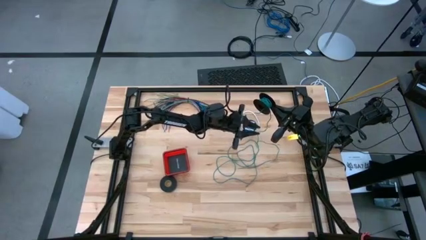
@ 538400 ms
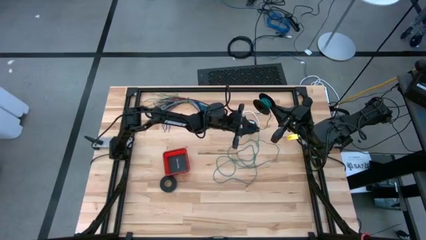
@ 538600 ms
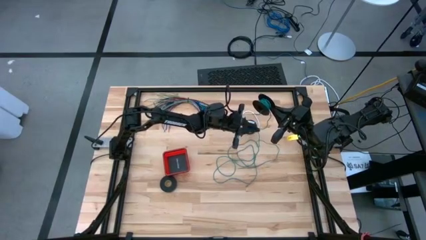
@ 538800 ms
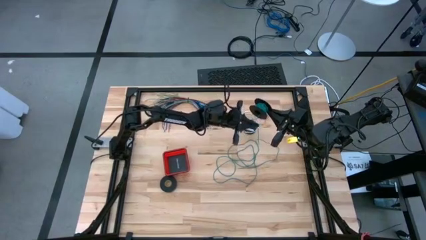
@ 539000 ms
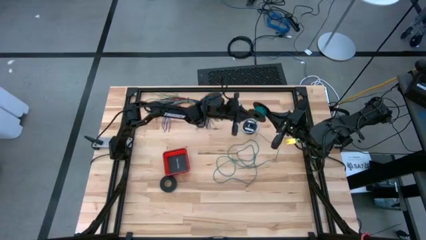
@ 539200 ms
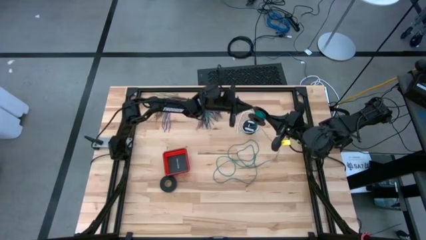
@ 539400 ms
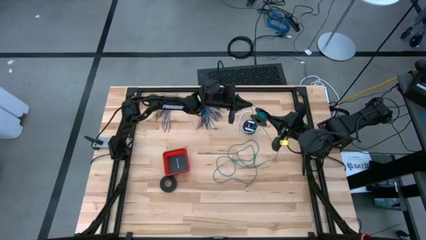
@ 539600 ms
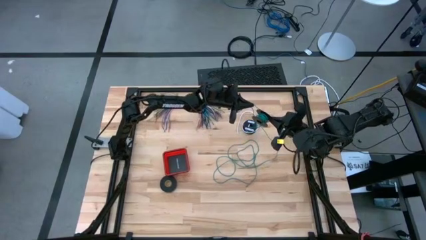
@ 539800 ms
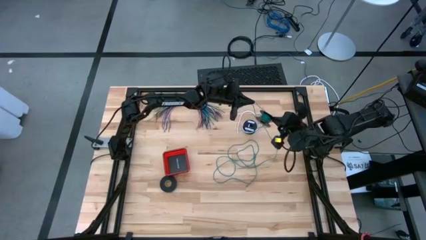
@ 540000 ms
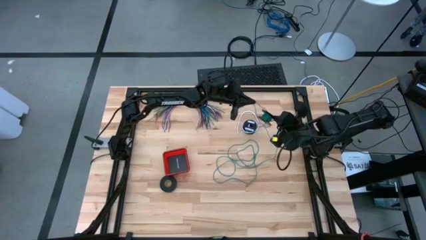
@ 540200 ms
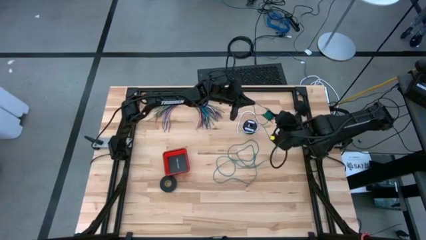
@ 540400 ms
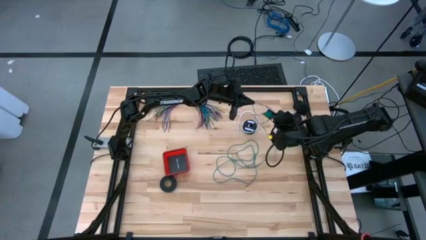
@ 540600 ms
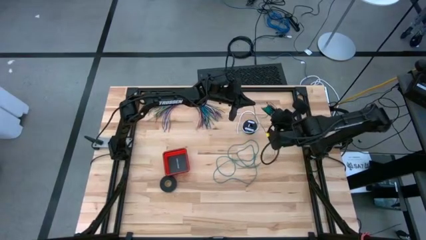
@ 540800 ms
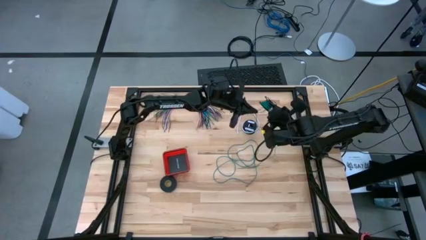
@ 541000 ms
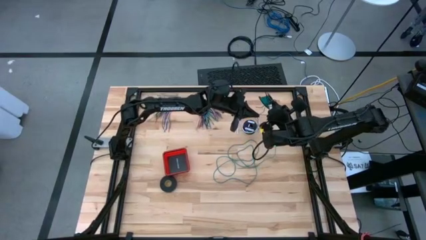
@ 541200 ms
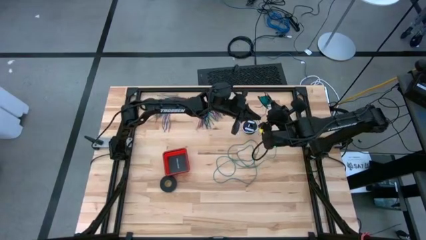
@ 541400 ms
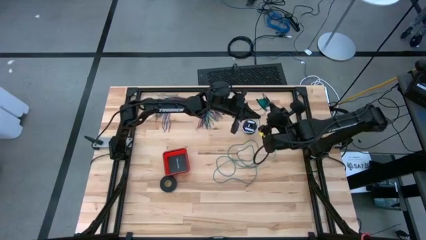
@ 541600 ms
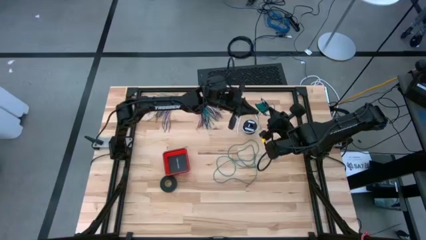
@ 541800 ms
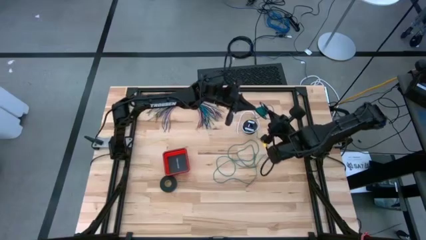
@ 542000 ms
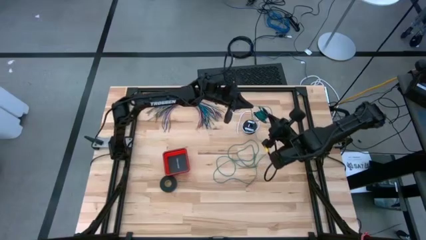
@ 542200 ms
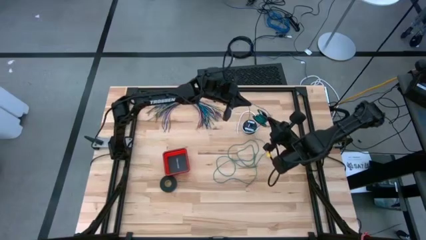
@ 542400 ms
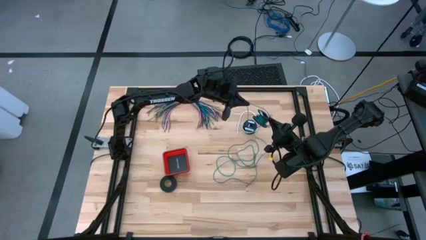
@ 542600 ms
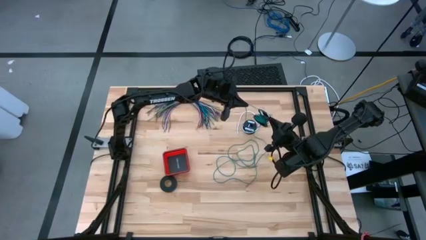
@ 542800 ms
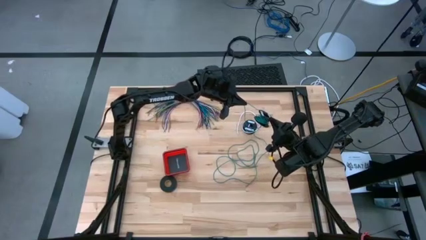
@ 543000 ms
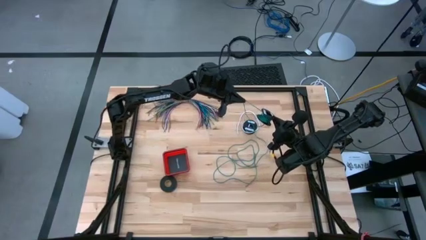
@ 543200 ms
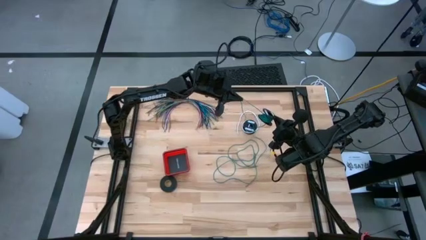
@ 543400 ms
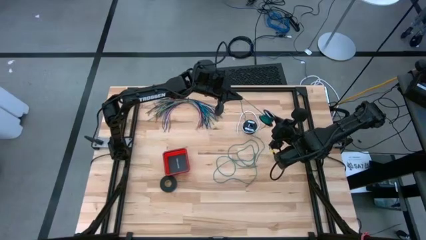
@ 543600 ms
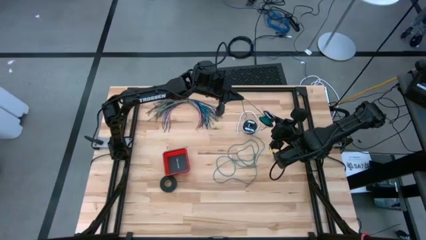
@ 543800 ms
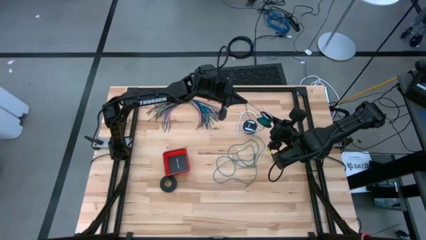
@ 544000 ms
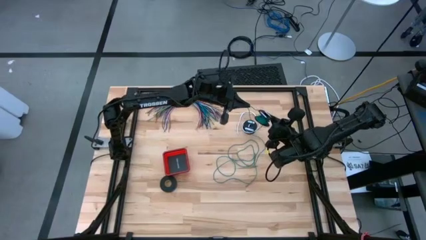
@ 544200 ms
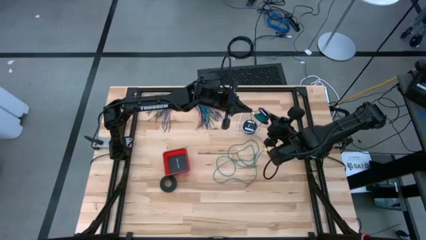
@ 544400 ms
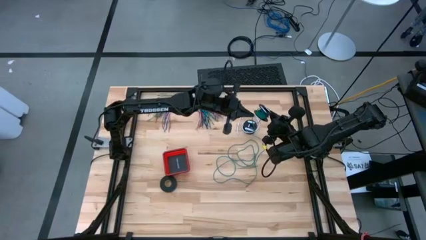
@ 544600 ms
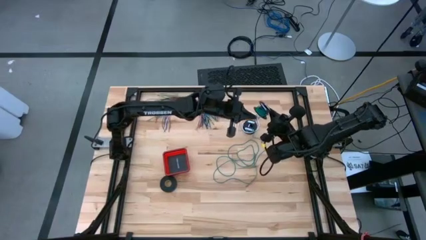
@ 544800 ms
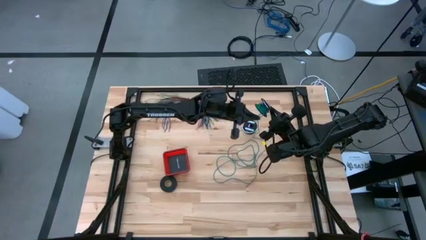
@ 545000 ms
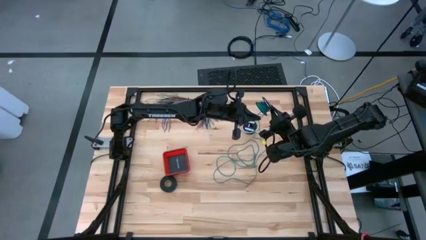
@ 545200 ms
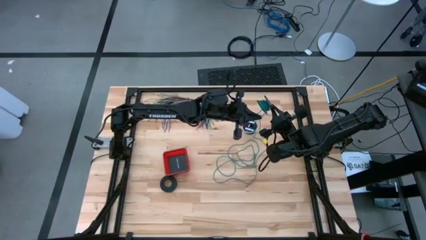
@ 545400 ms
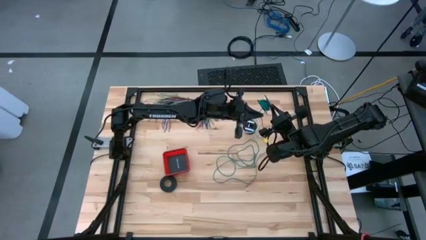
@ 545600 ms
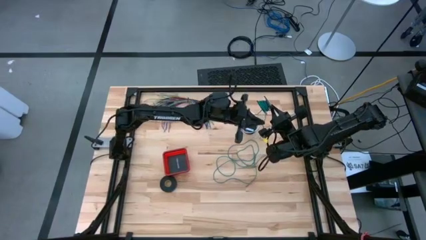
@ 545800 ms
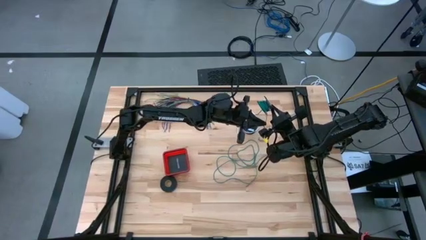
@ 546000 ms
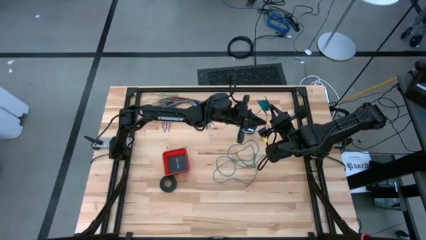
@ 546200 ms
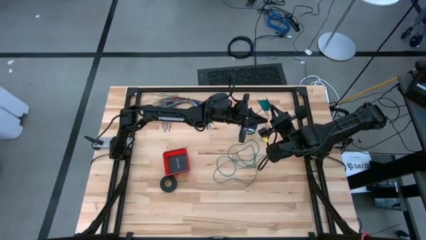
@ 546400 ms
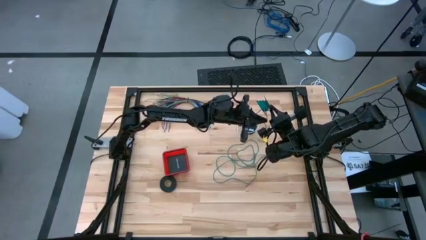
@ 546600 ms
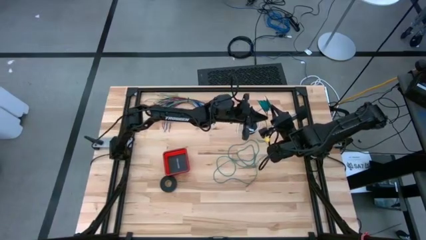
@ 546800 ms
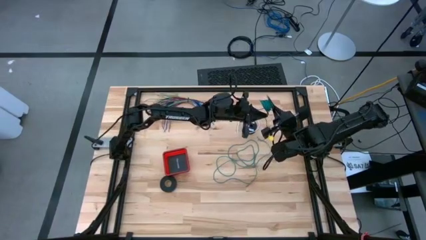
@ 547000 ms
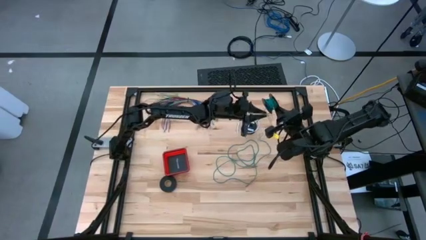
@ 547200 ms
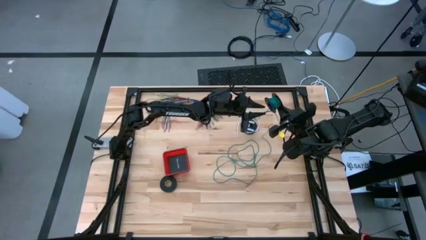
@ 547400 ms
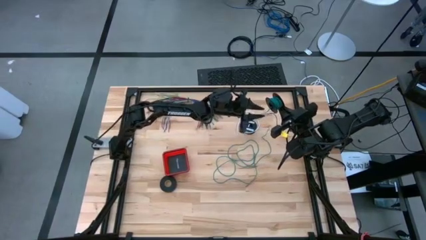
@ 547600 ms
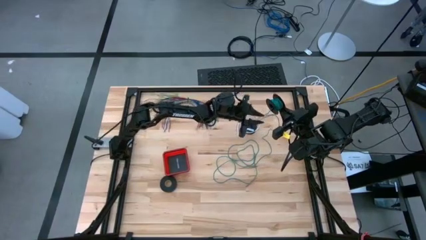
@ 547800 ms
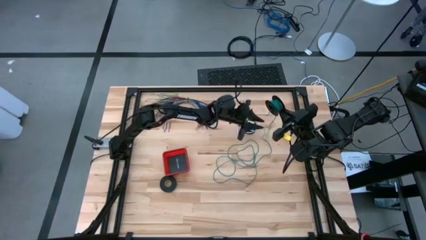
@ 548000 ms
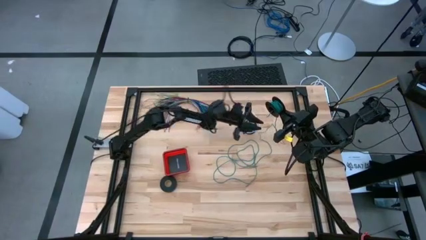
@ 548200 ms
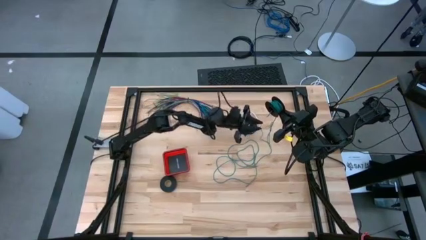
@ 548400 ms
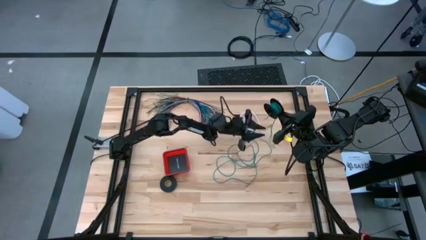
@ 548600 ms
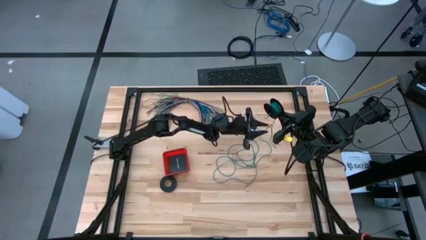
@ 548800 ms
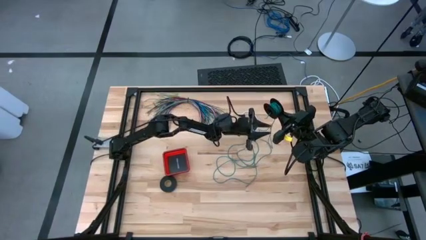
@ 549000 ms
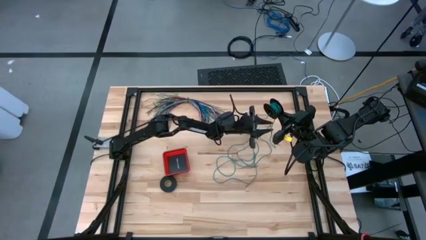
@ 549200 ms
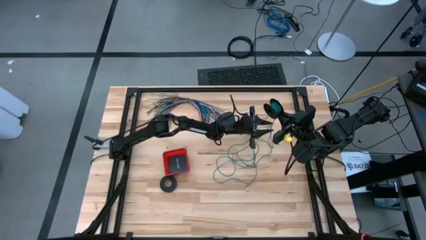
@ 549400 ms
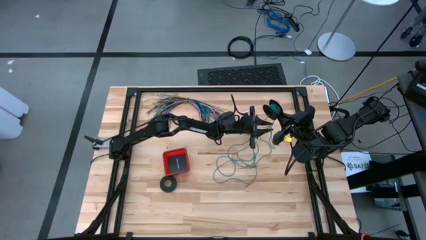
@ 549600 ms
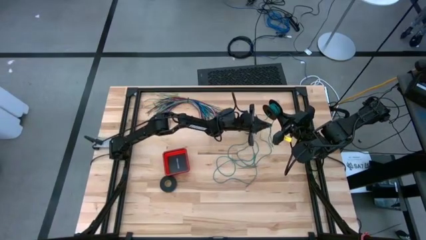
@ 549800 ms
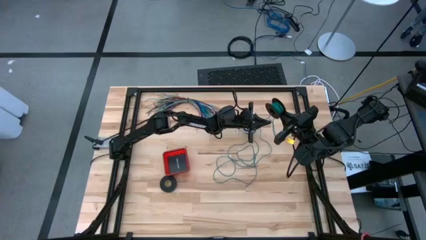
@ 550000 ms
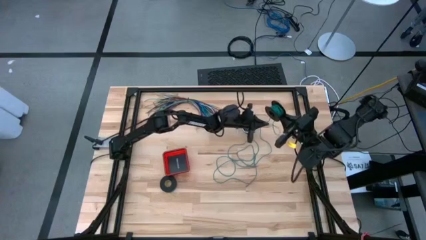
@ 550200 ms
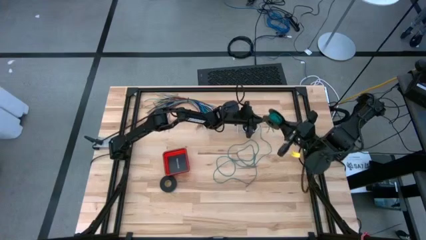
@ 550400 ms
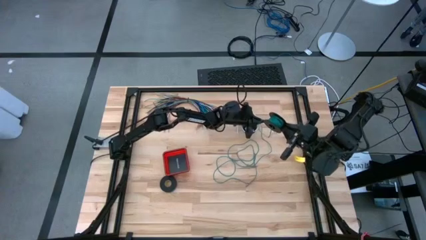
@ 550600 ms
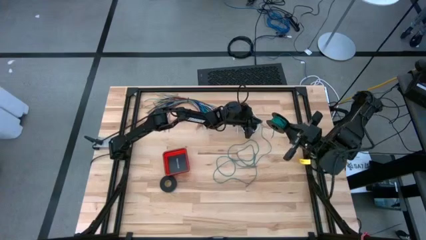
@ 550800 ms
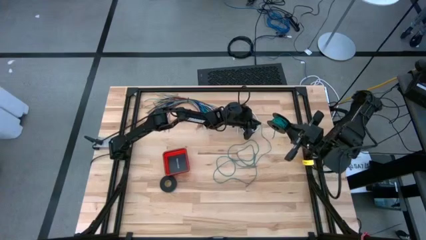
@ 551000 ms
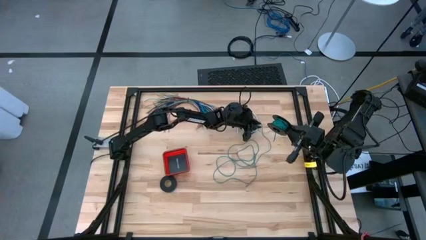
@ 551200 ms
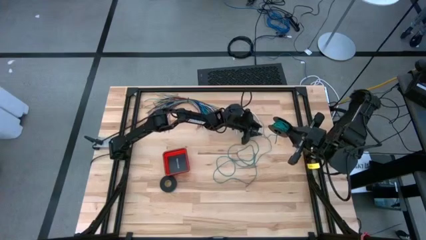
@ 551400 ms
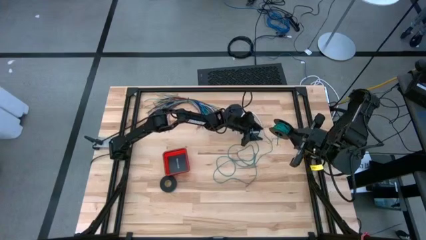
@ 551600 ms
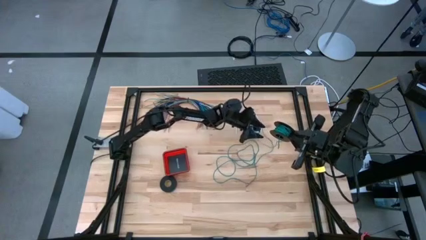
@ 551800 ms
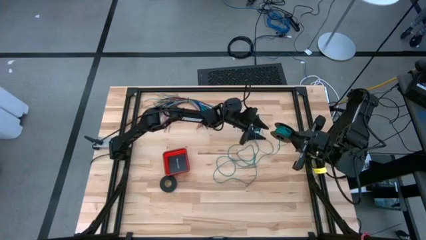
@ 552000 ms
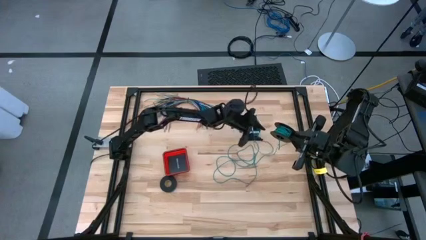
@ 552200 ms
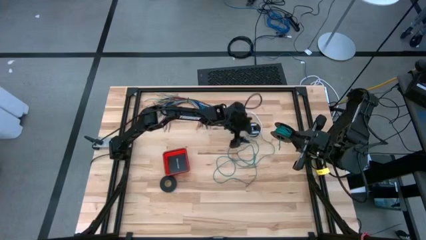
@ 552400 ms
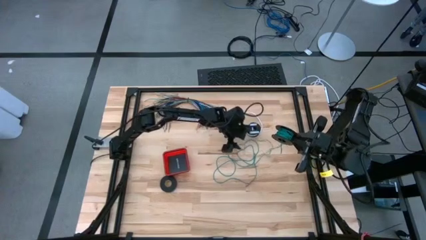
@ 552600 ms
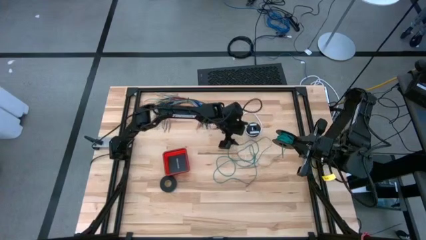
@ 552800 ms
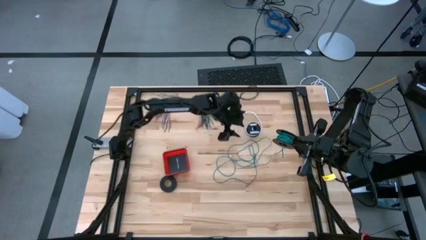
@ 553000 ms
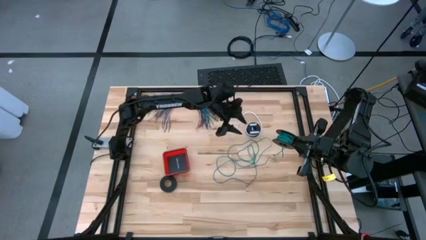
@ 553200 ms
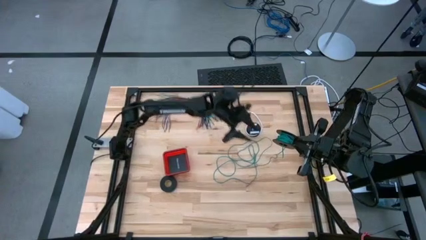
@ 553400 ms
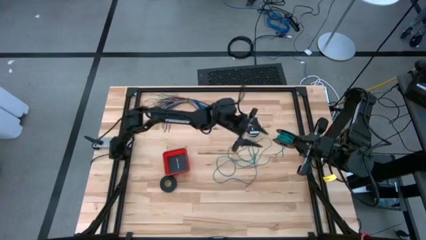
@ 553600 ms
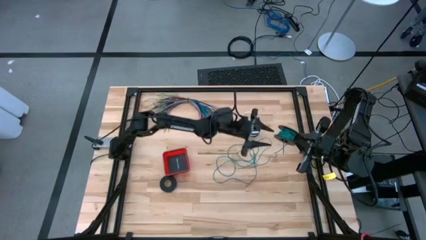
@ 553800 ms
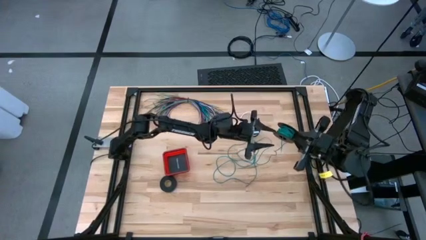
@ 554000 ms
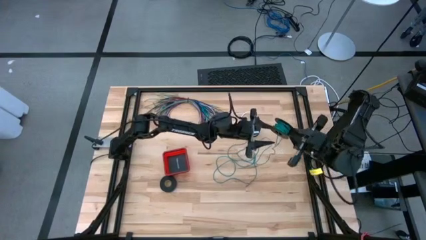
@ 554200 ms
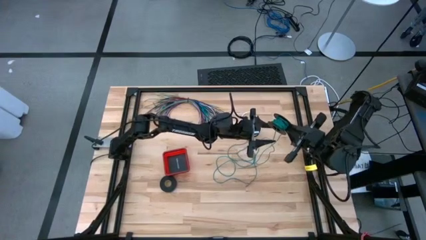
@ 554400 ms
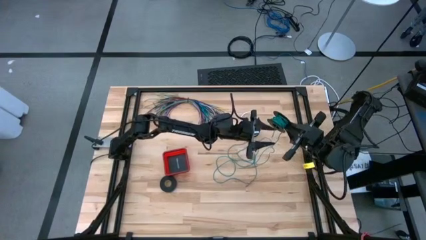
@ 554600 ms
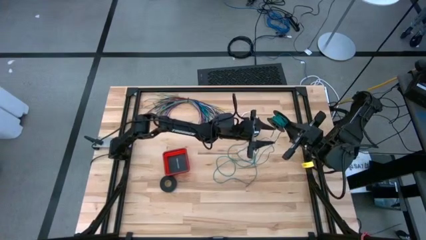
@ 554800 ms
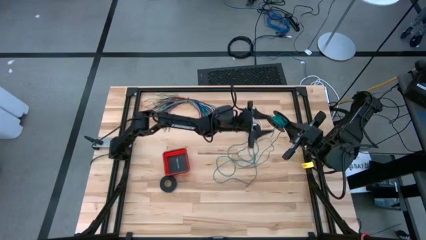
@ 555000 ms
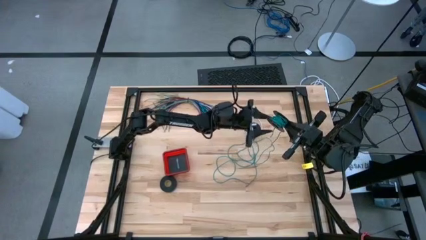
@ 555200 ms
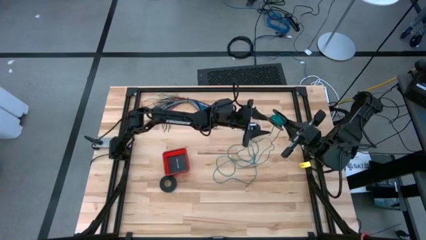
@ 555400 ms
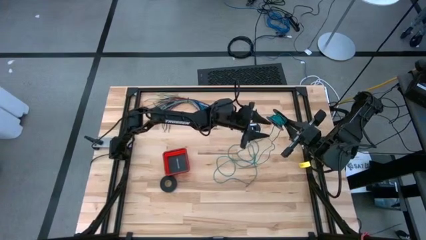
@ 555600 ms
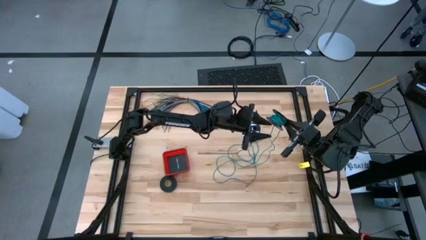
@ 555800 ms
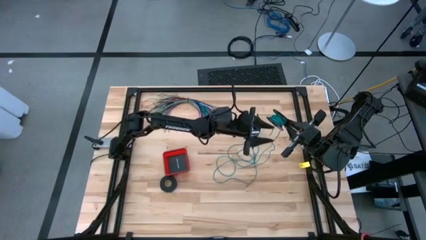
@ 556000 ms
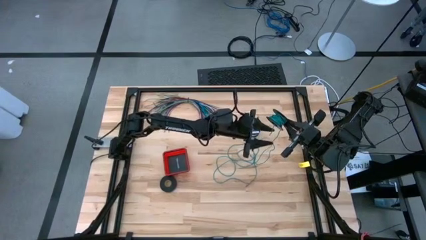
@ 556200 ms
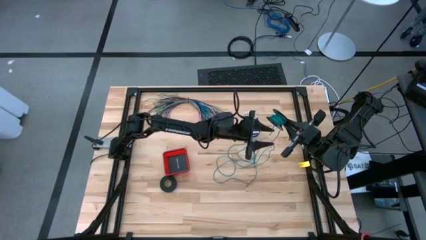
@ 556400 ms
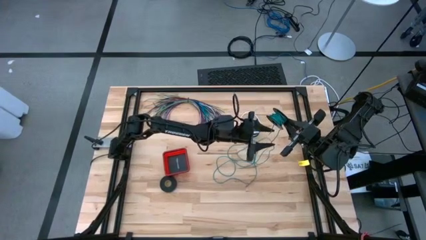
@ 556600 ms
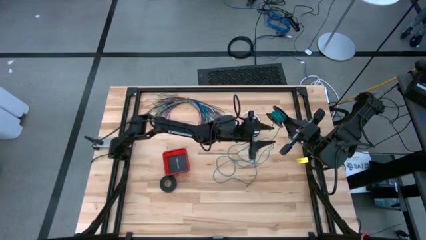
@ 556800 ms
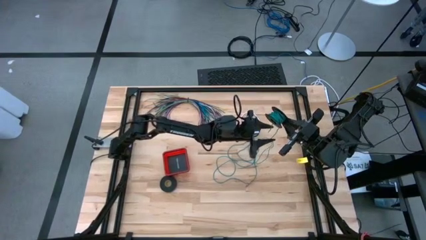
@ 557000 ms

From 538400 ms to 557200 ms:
Task: Coil cords
Coil the green wire onto the spool
